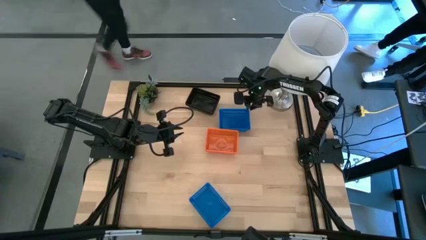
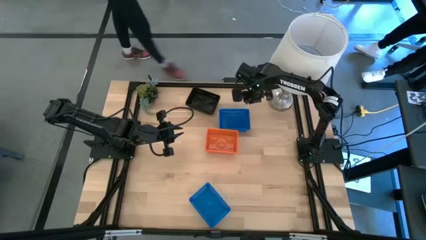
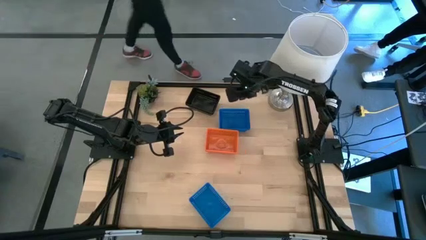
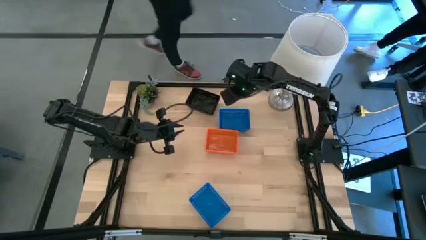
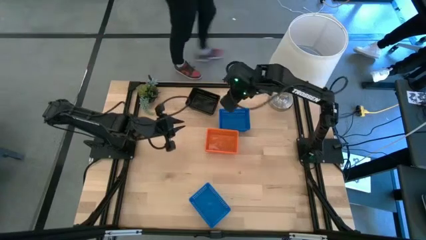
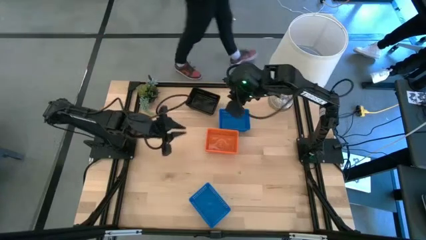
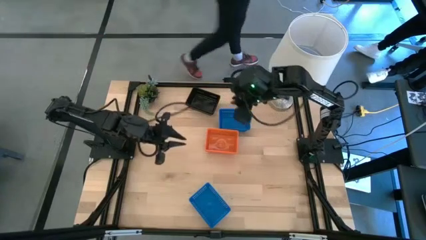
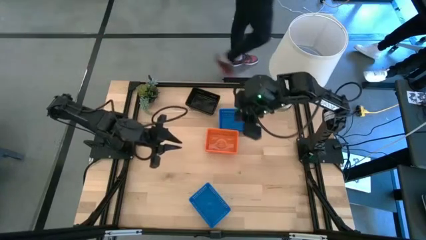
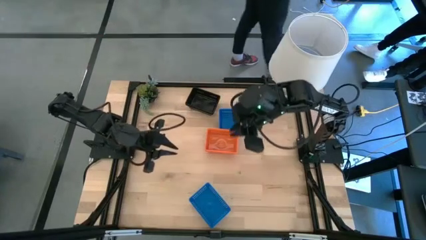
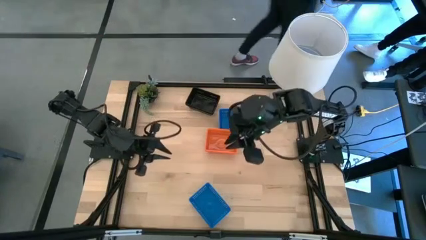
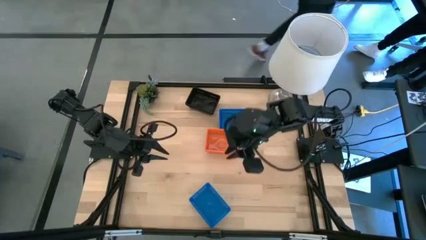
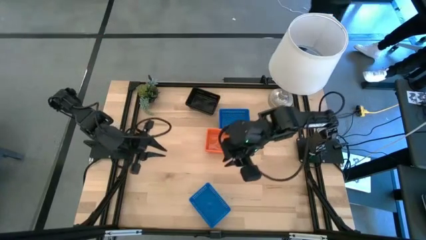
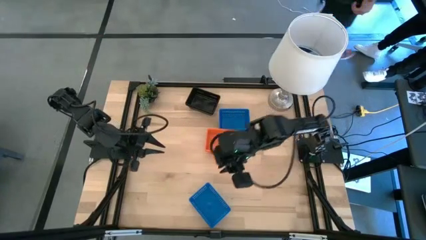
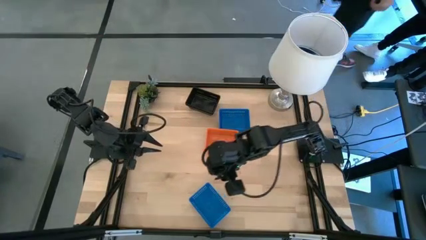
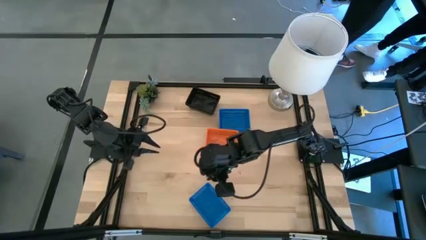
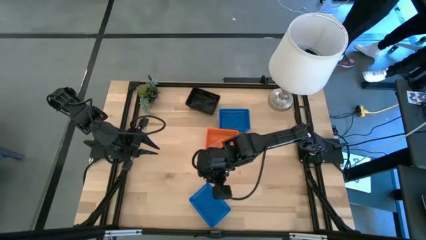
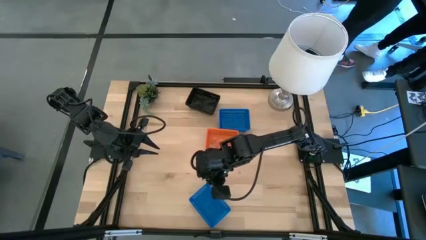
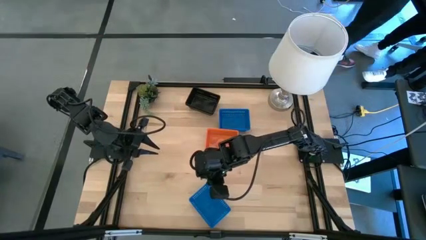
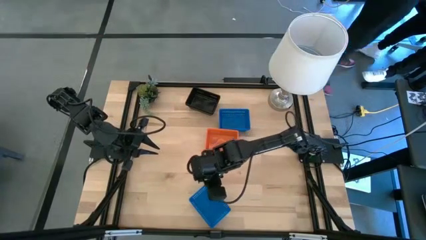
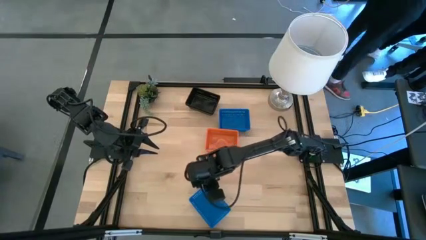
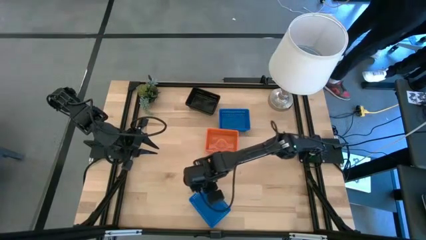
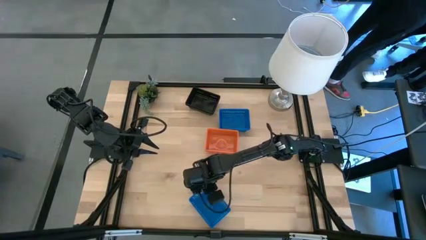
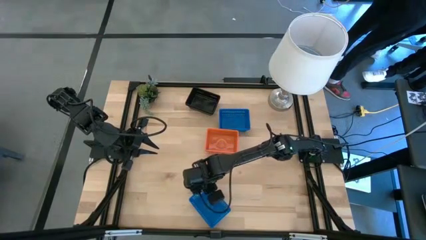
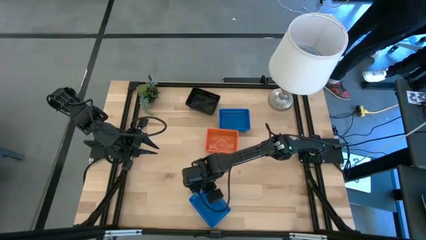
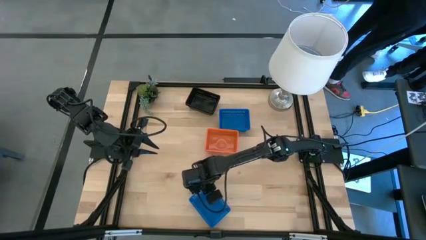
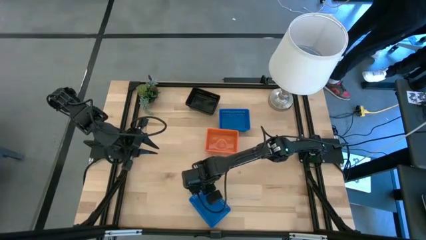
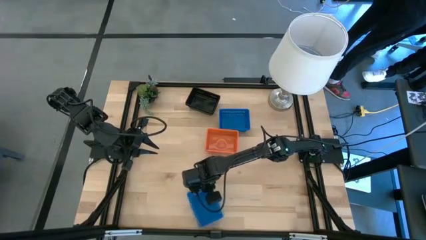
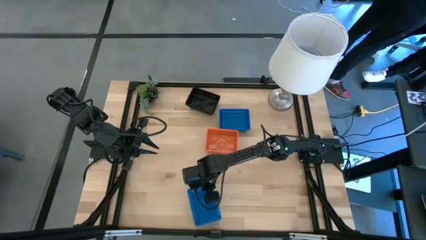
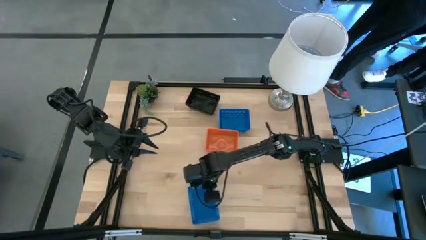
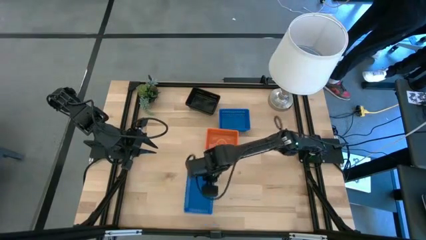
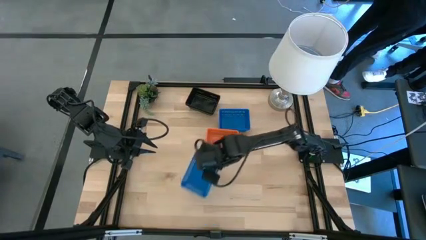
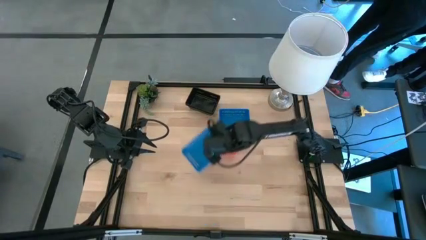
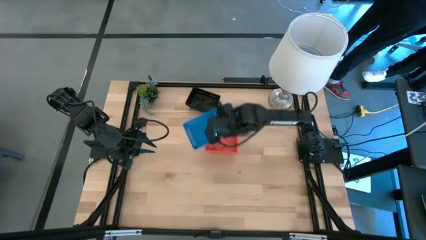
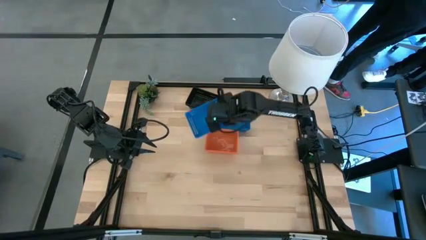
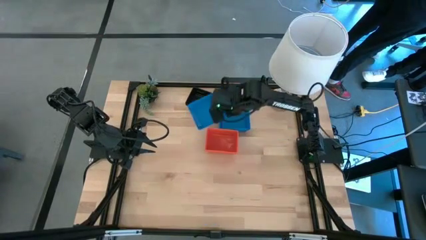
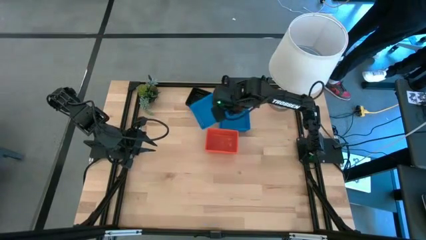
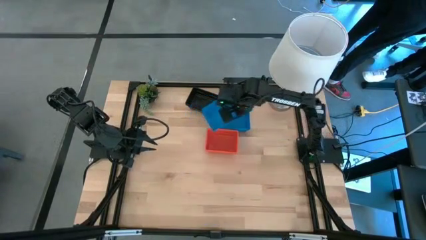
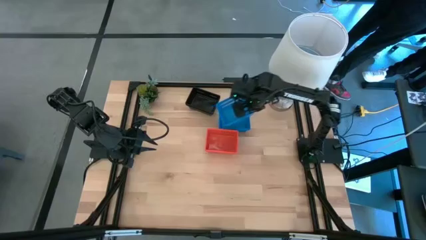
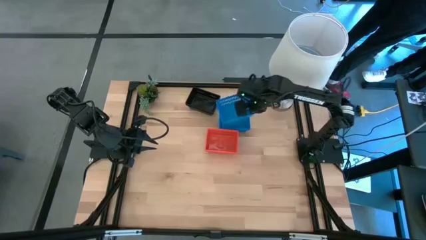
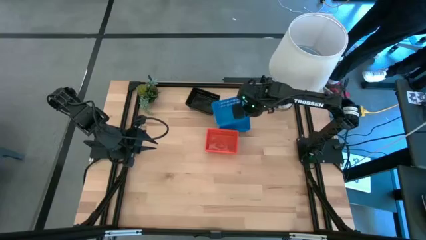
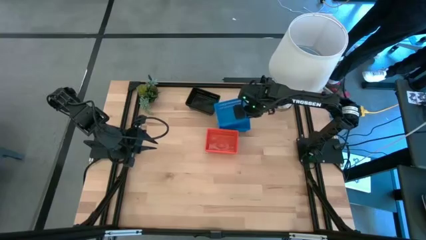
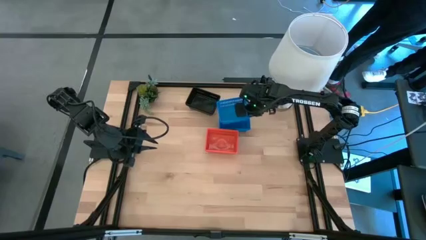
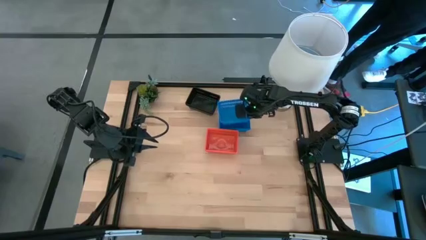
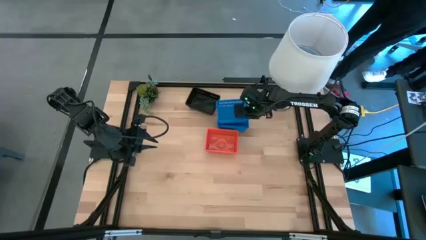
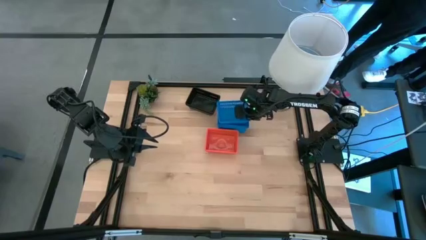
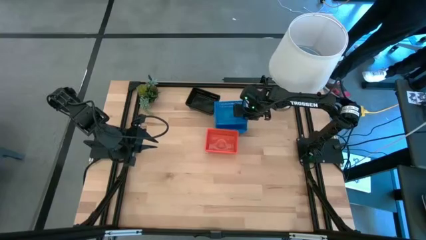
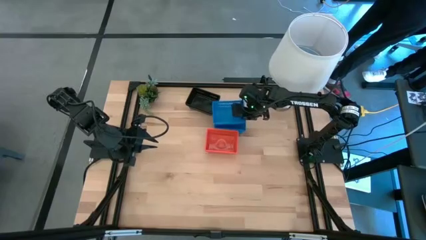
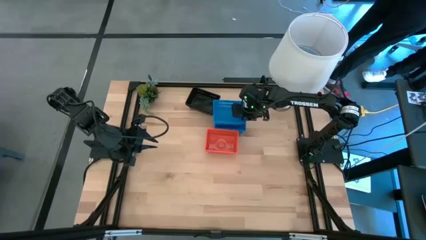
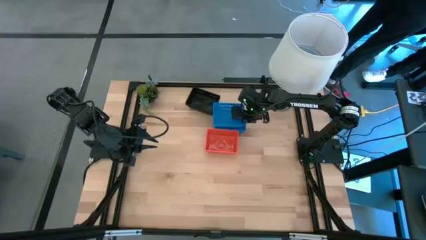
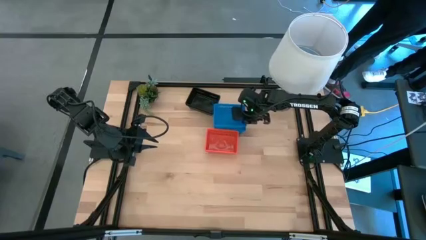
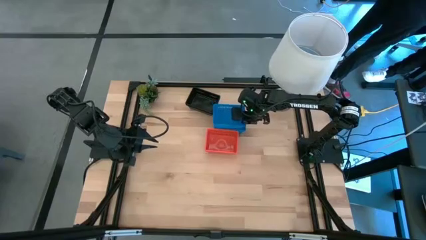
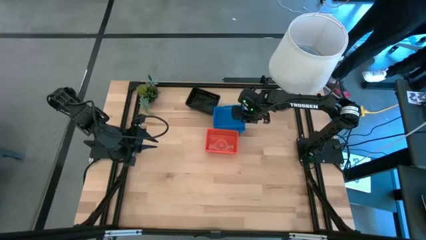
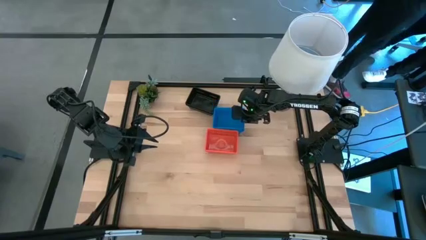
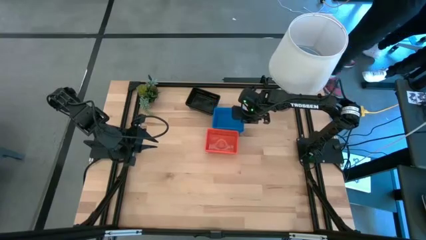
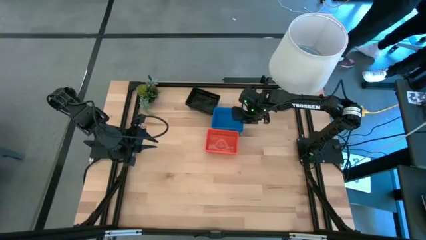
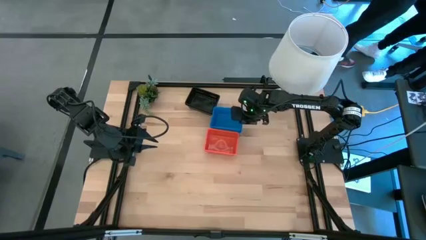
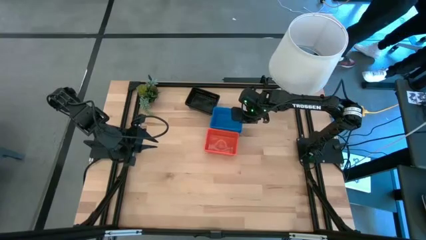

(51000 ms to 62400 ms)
Stack the bottom blue bin on the stacked blue bin

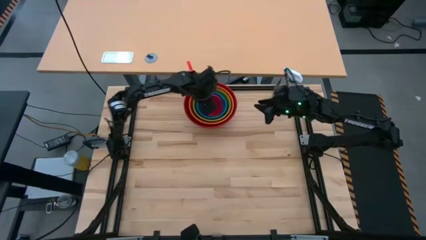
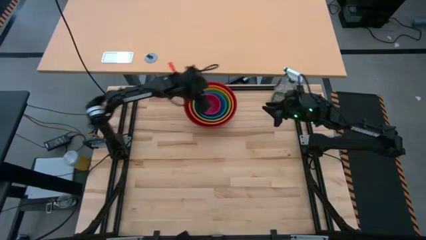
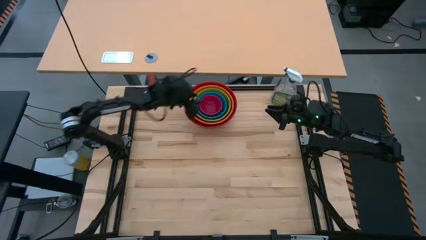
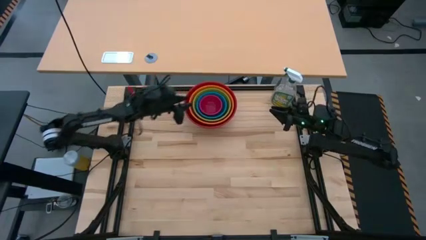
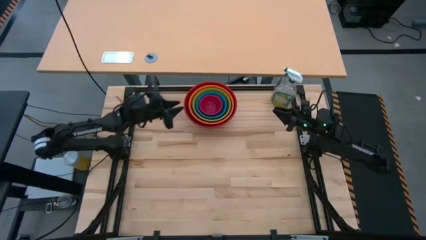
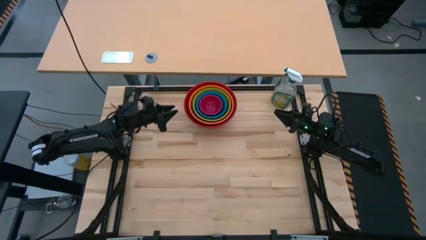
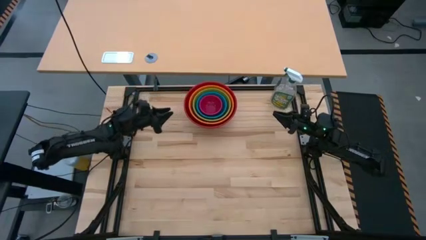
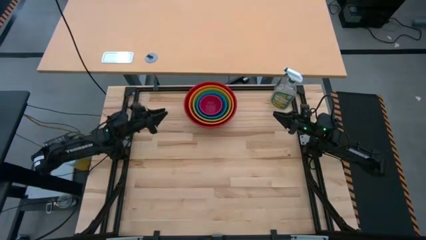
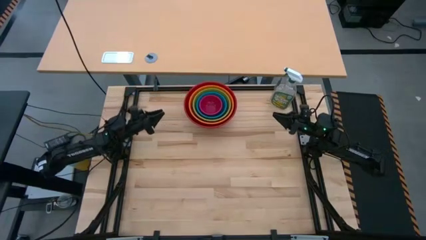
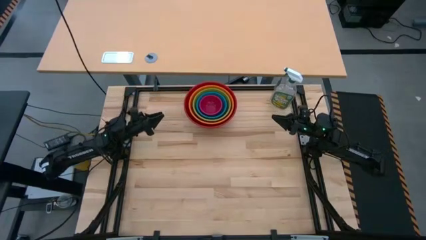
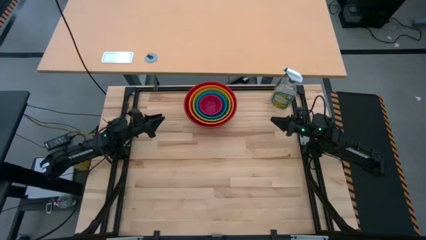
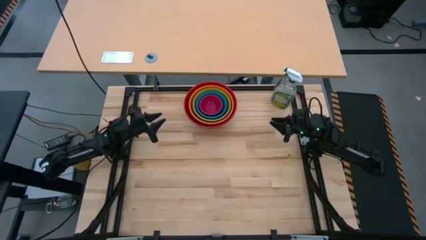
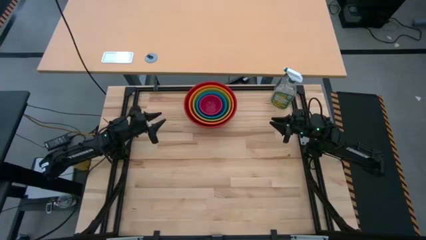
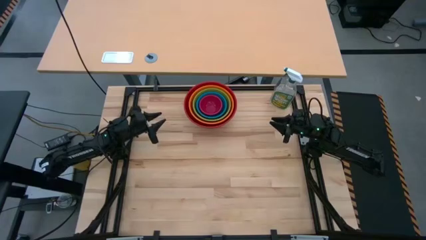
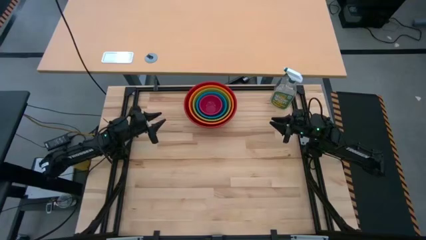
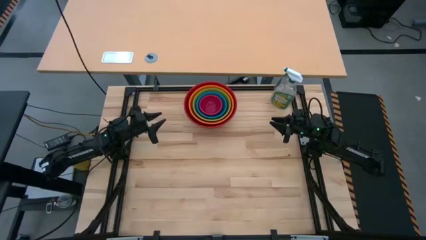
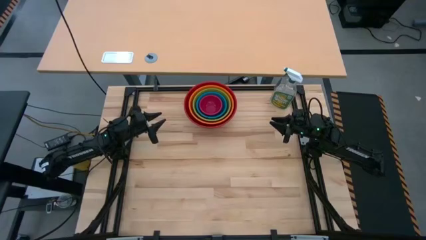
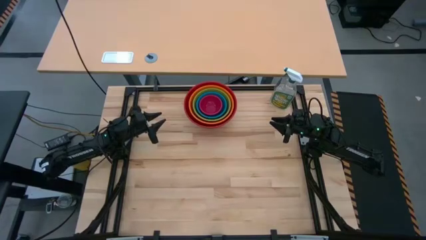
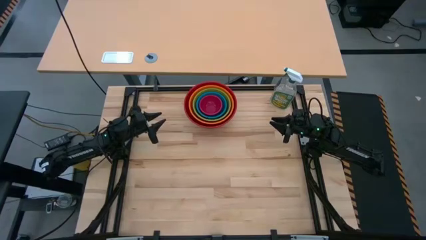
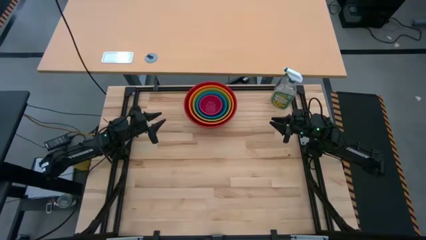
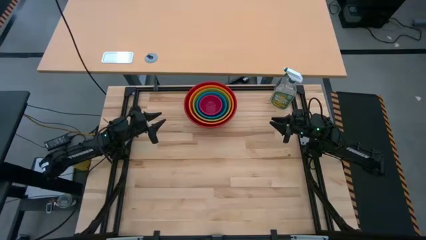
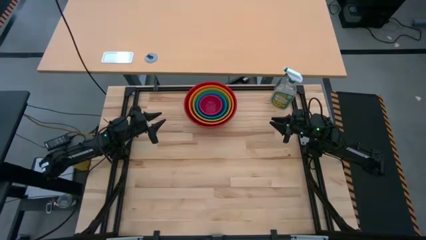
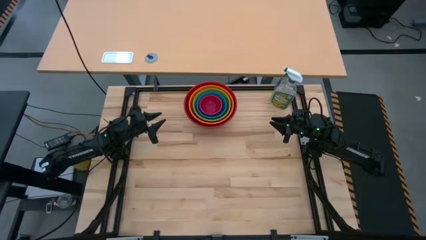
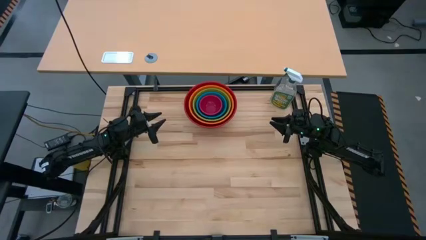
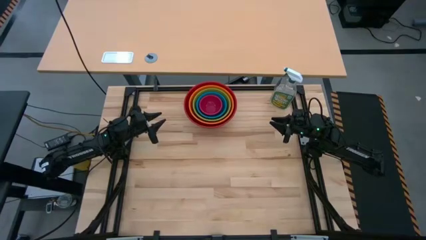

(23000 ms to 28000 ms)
Return to Home Position
